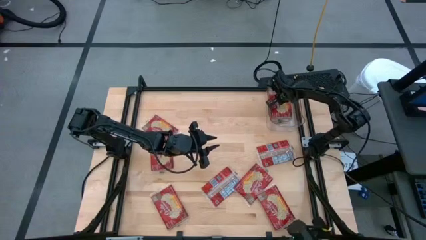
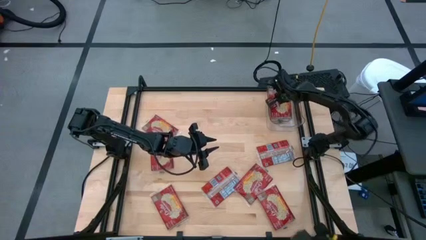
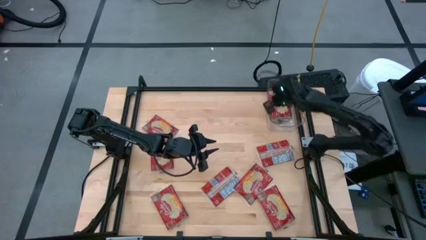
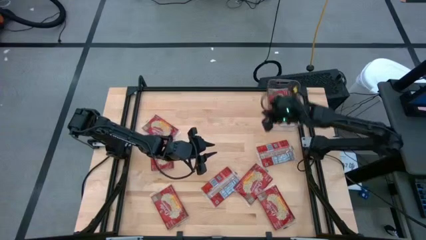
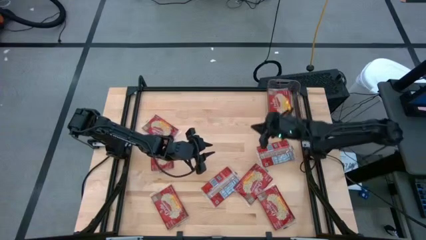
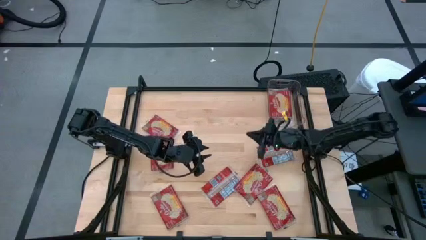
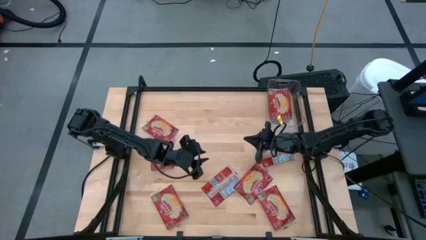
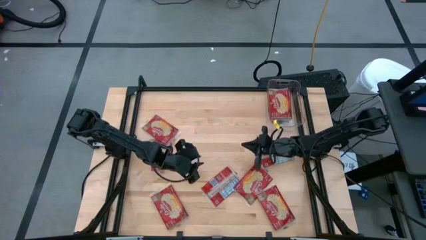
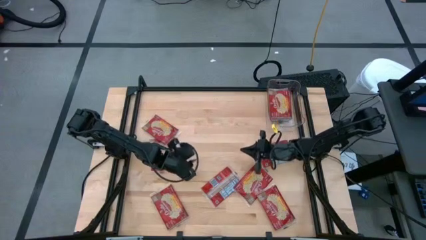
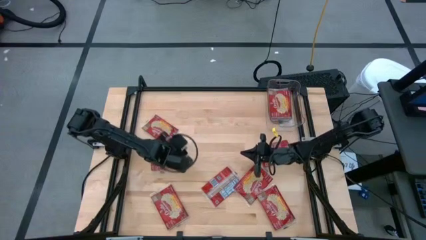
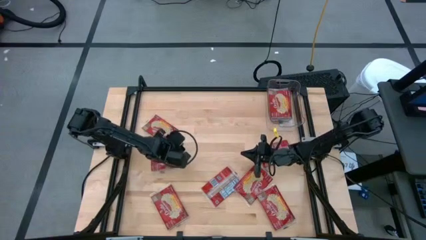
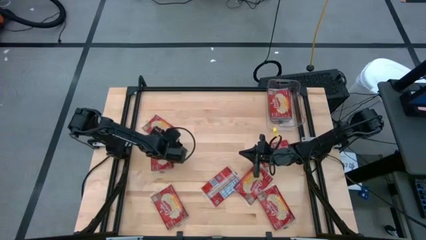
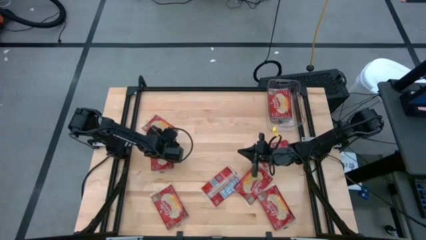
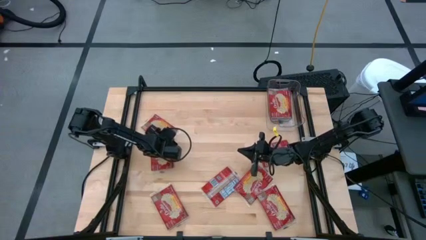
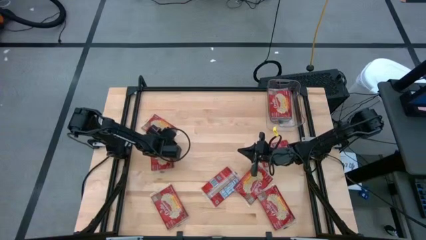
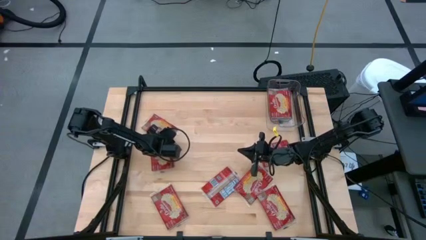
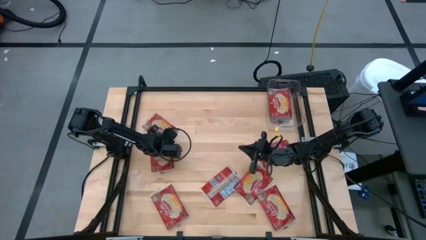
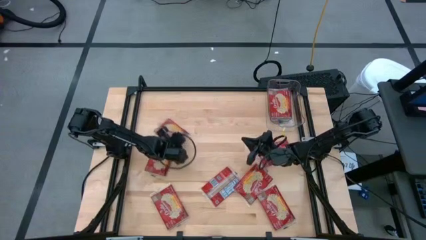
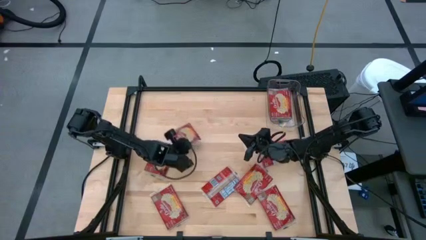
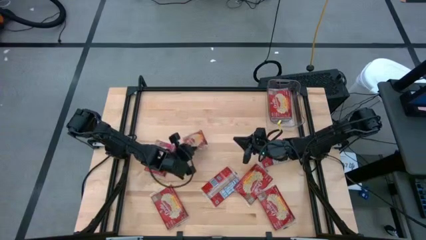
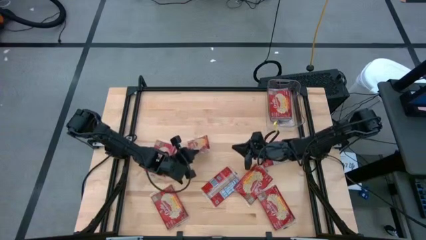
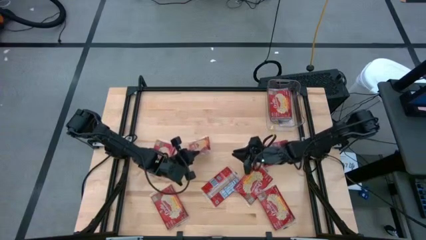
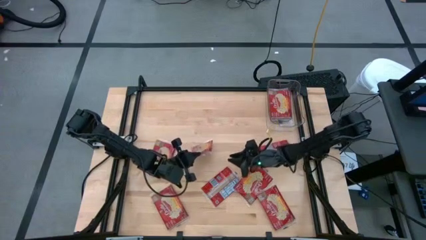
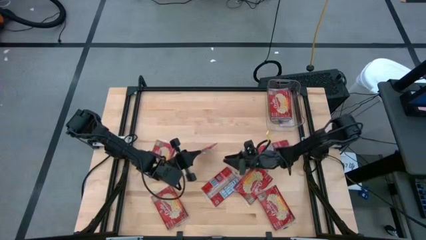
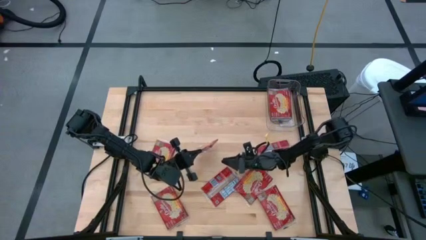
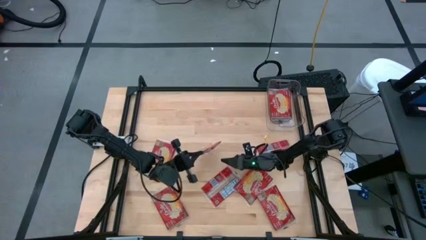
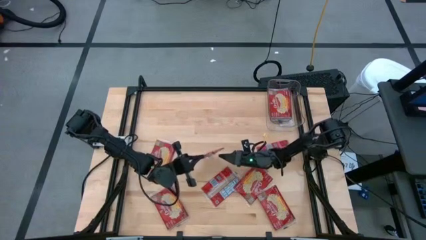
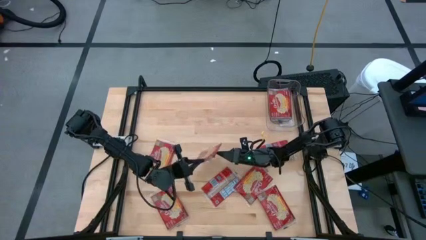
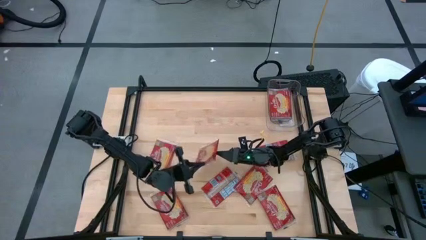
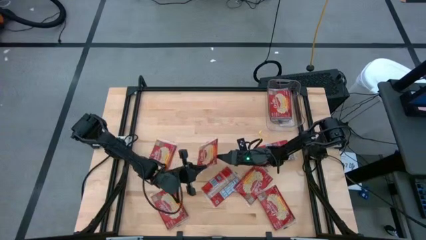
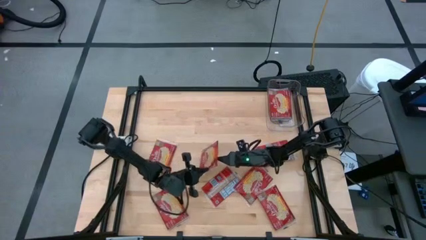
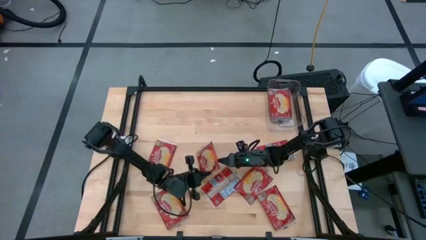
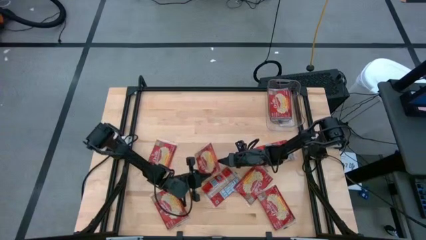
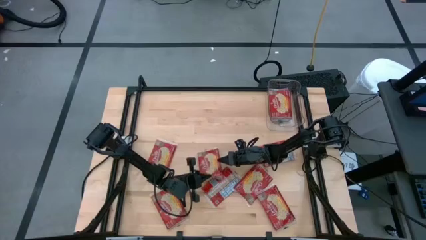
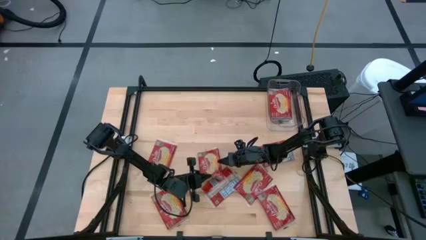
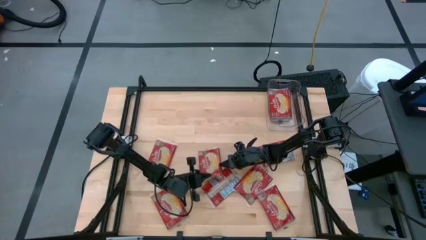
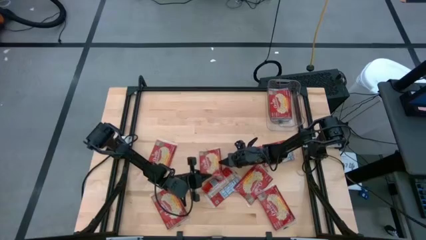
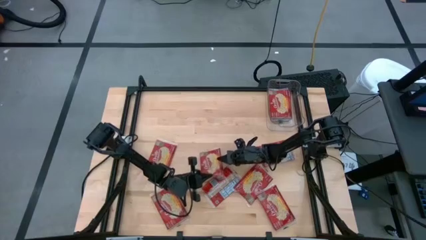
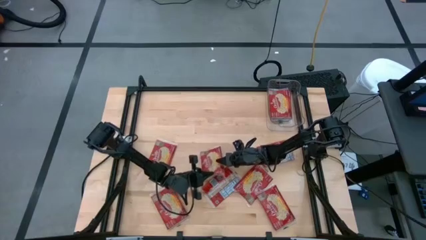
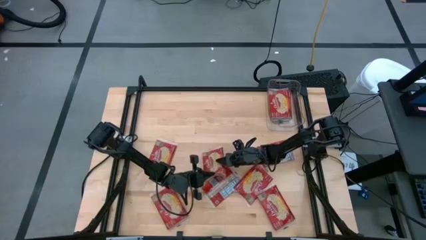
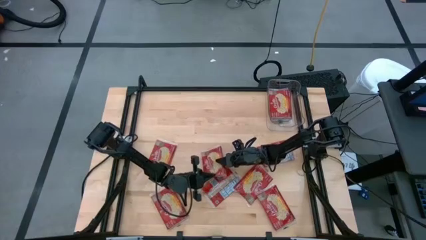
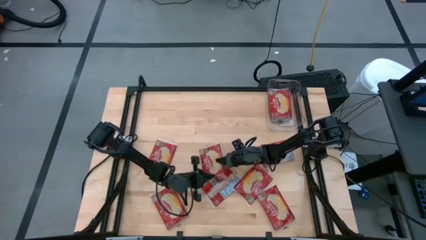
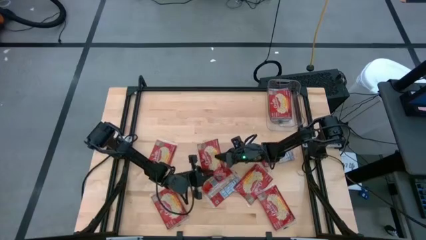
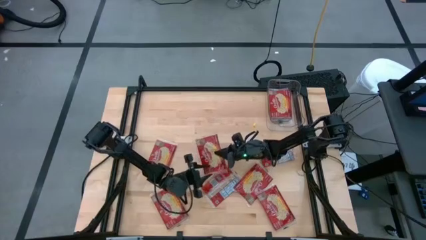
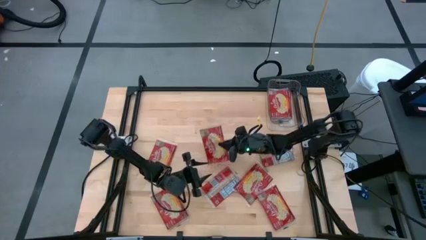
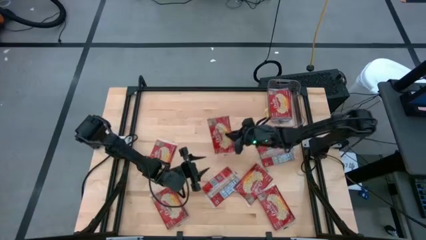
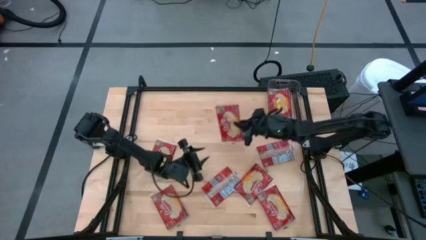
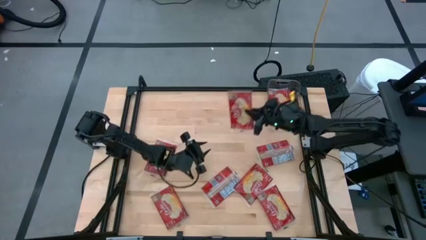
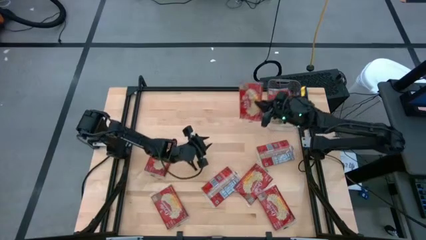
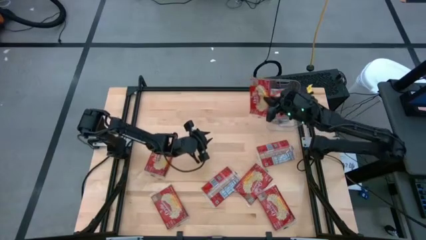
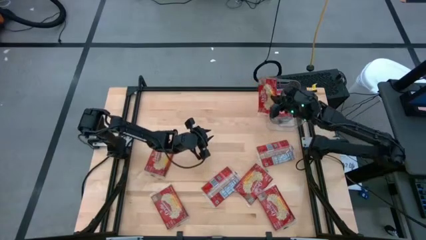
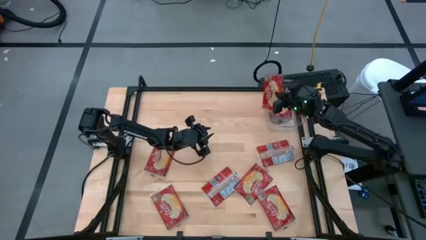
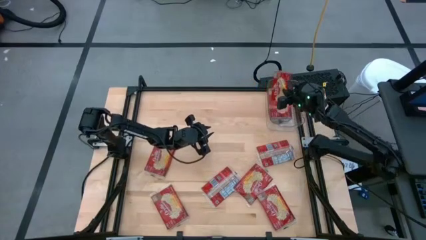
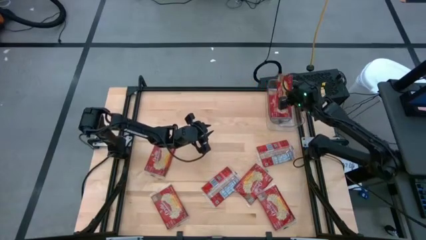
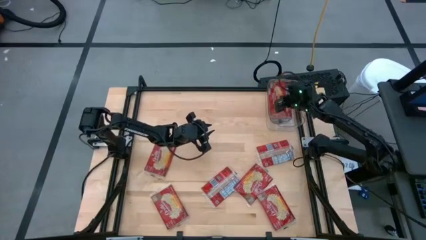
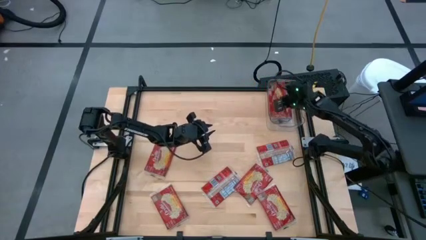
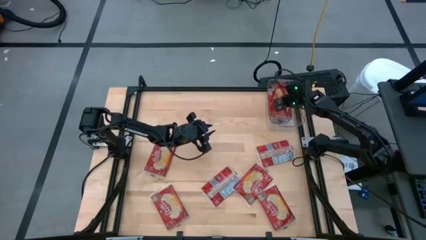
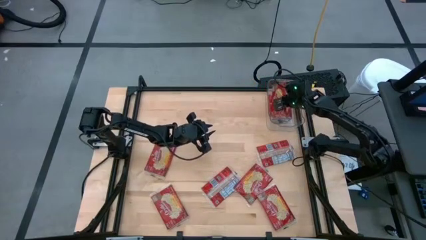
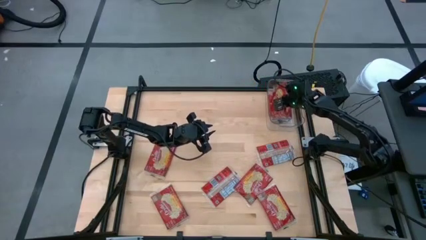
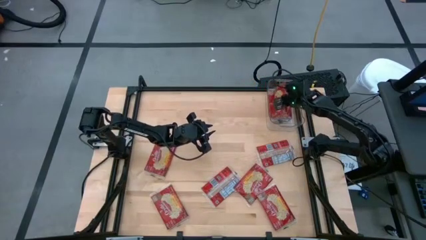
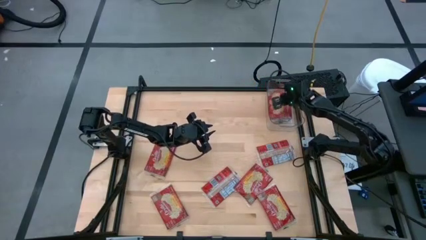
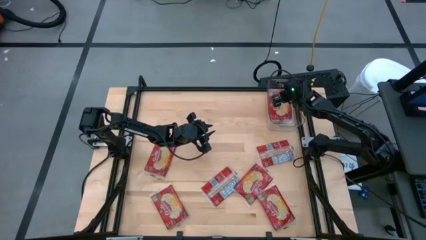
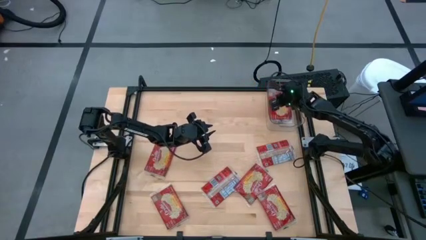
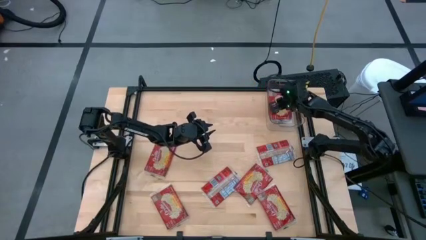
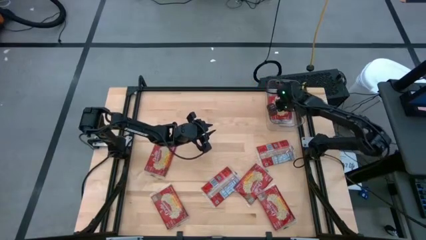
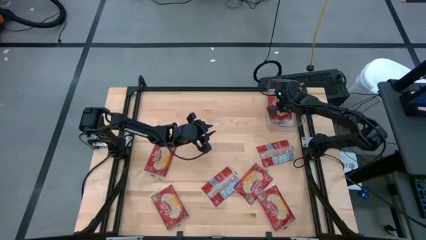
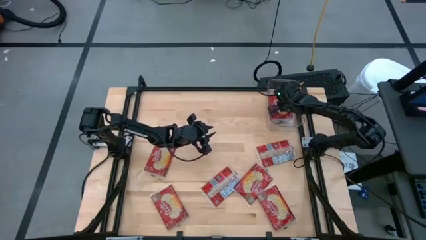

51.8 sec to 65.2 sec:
Task: Sort popcorn bags into baskets
Put the red popcorn bag into the transparent bin

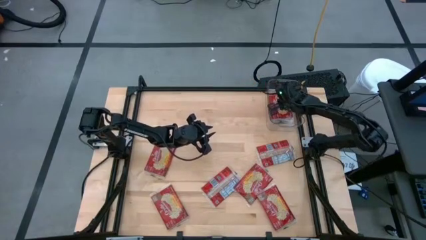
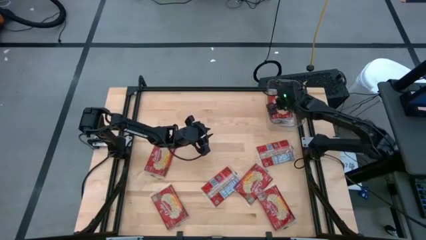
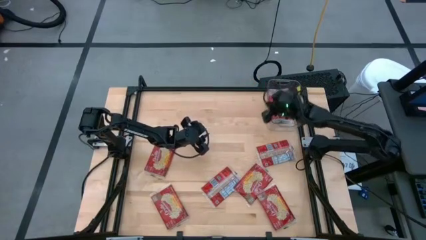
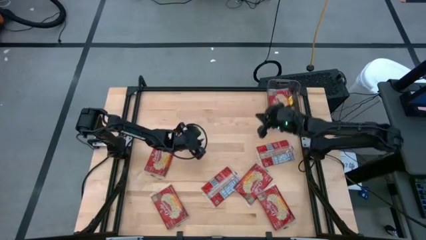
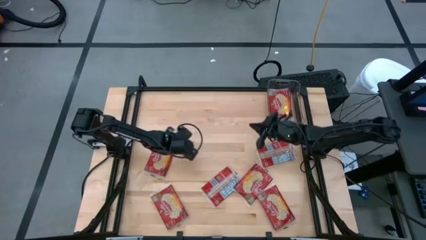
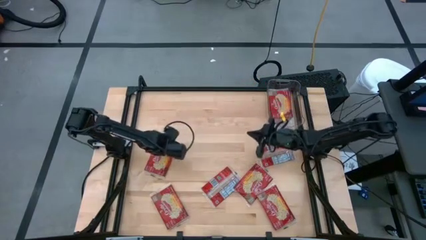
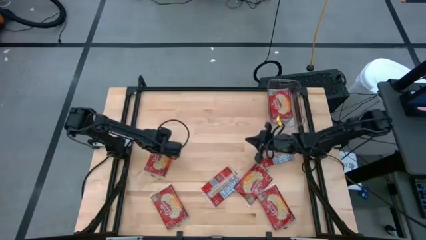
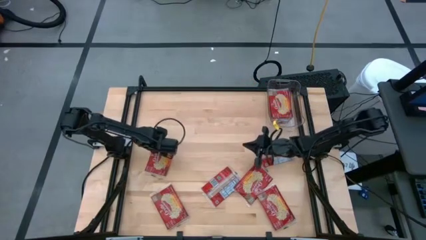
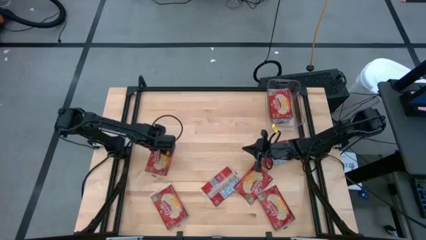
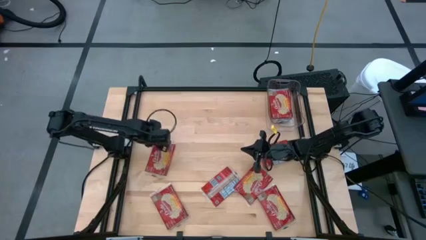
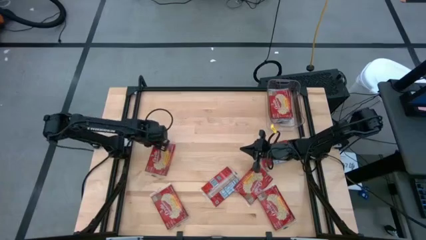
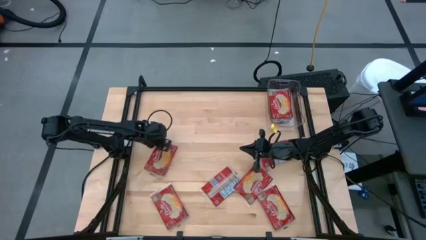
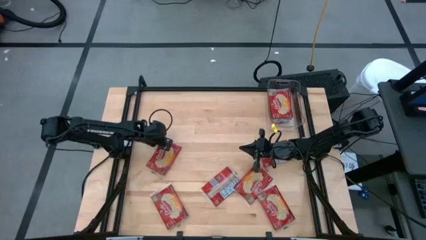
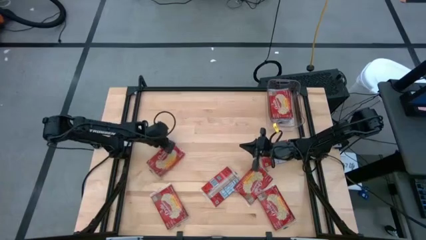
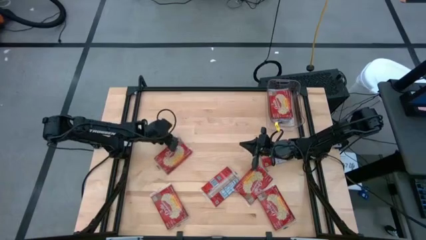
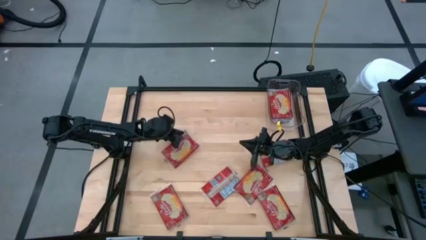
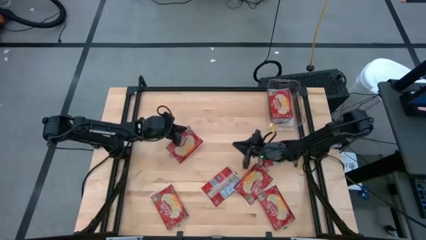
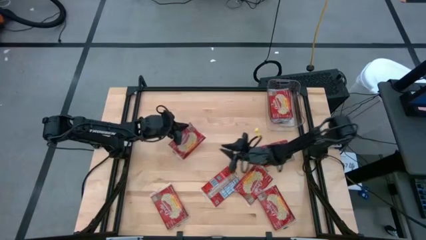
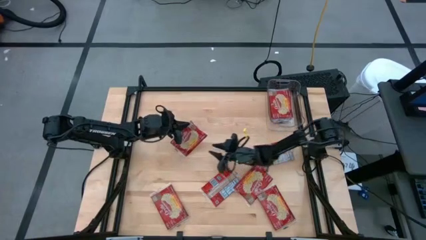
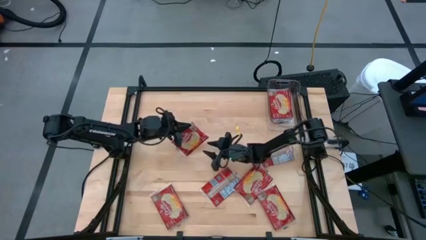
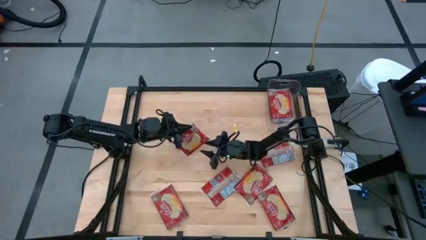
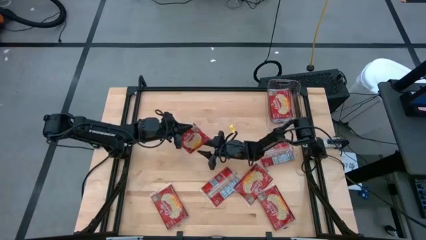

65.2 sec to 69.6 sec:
Put the red popcorn bag into the transparent bin
